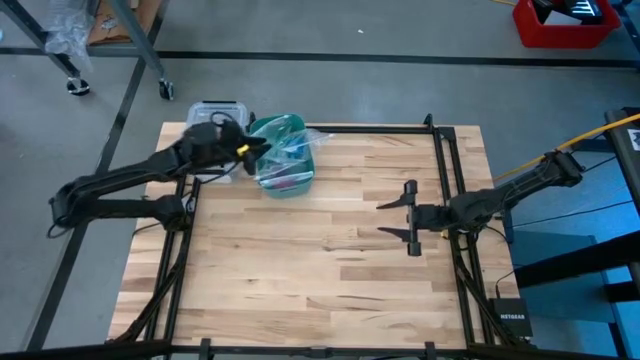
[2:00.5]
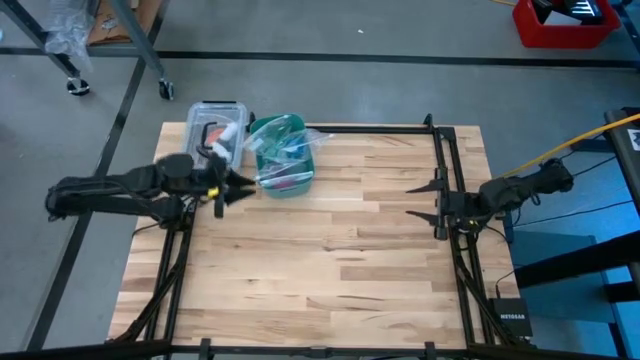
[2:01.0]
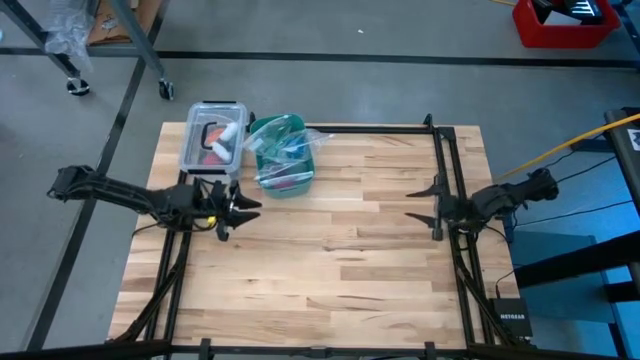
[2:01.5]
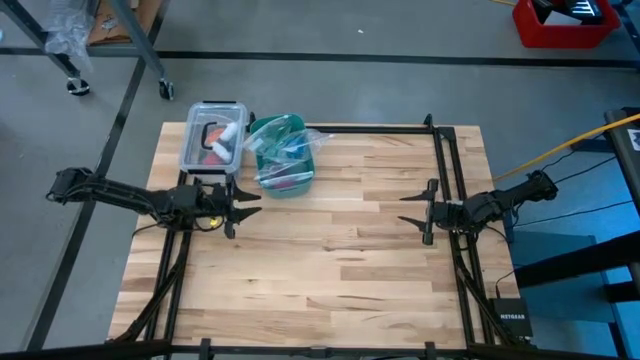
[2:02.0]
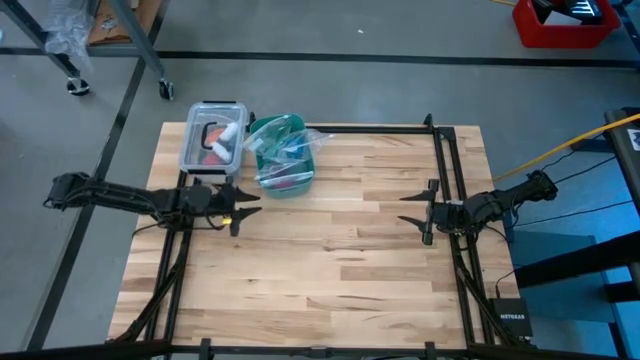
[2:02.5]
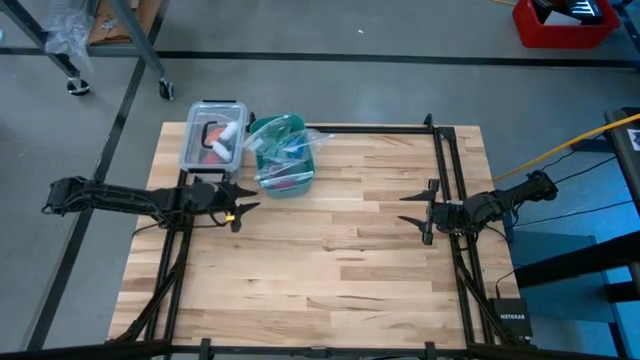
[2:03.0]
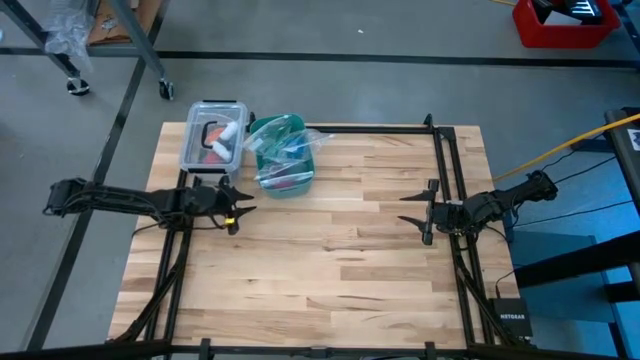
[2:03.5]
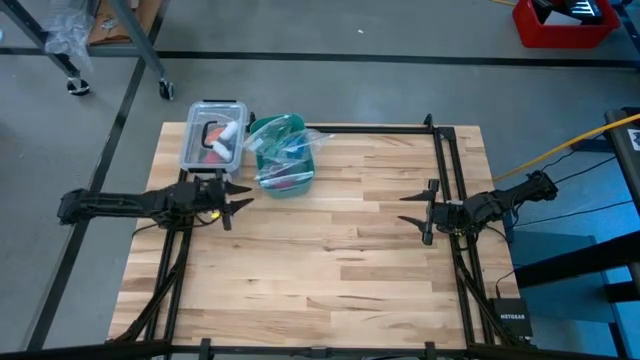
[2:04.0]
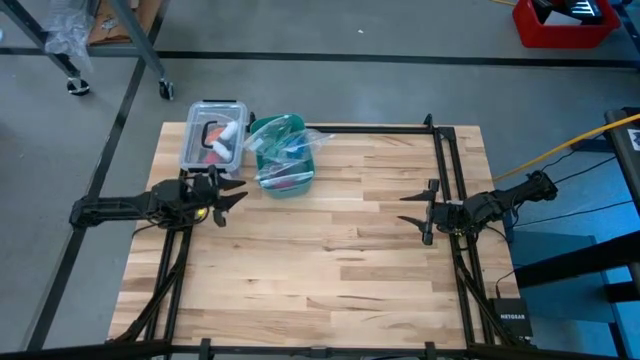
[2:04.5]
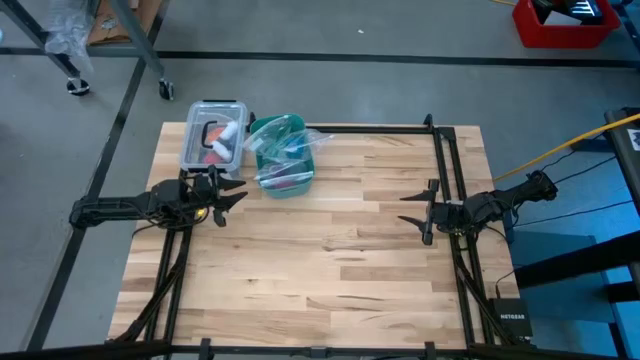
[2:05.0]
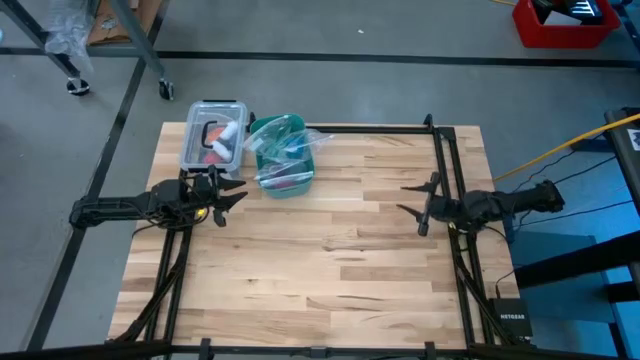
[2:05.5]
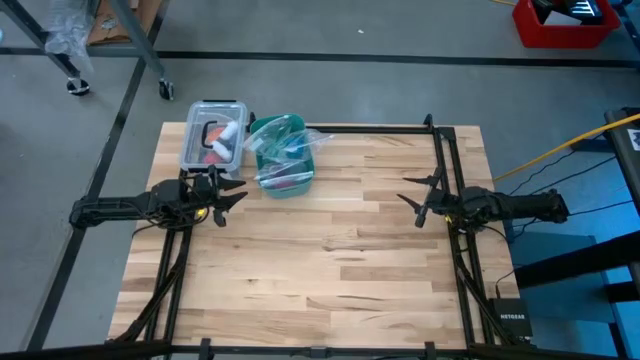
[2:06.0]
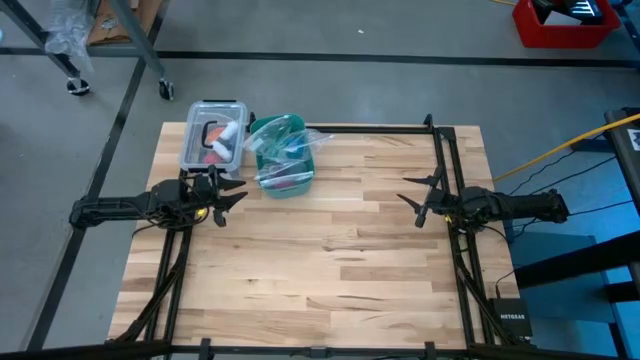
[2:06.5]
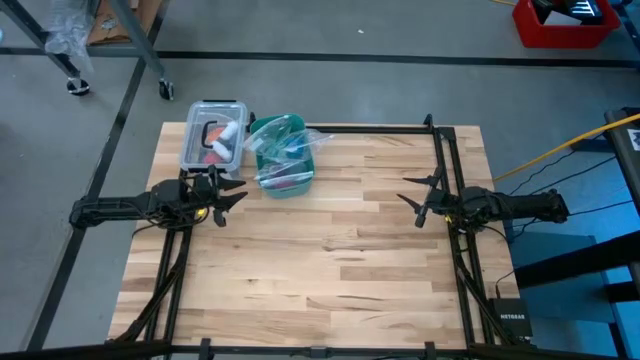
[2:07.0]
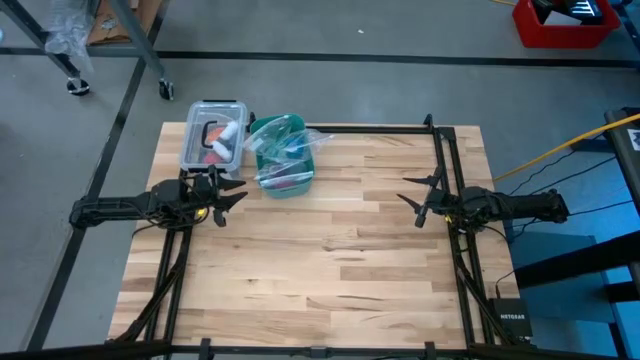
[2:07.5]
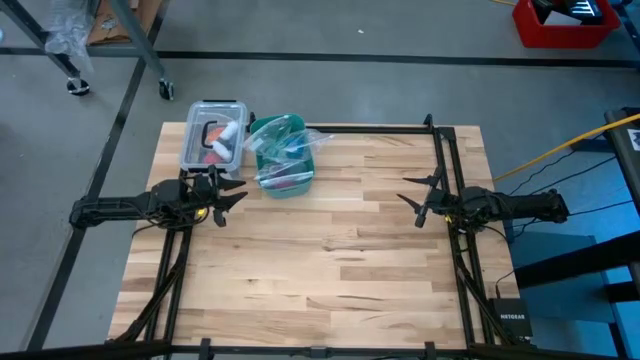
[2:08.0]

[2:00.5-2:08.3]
Task: Roll bandage
Return to Home Position

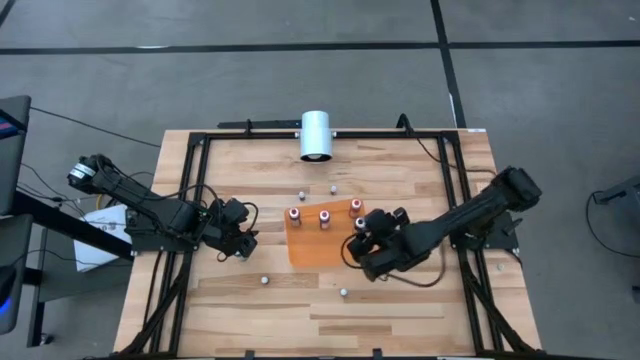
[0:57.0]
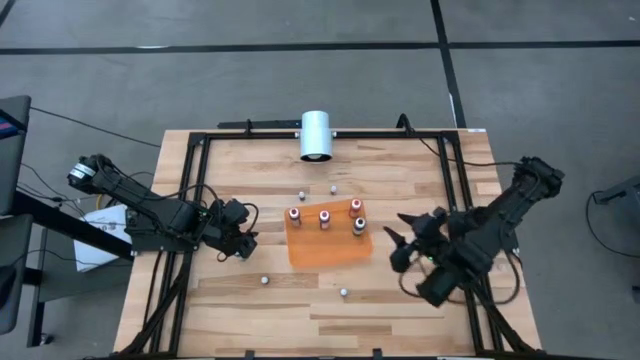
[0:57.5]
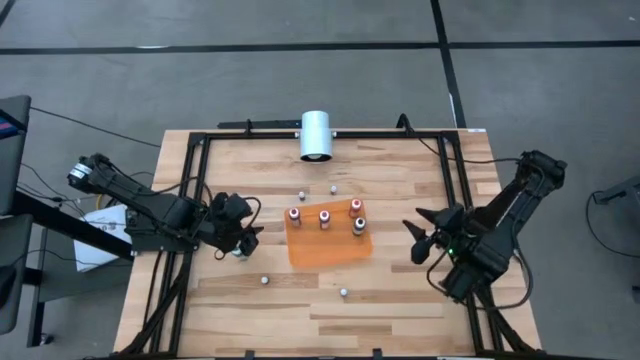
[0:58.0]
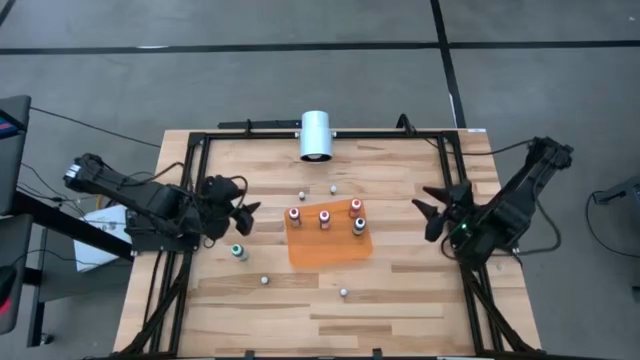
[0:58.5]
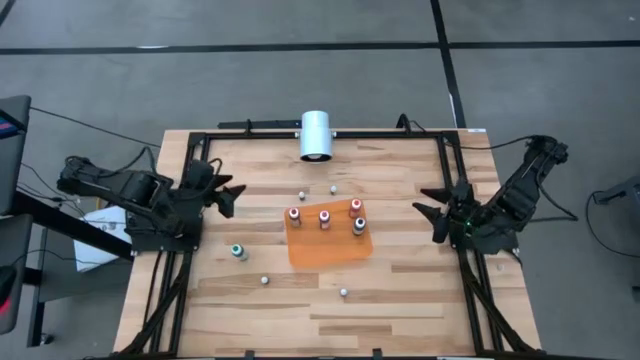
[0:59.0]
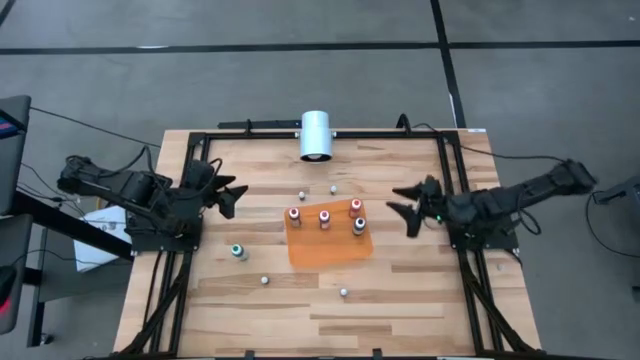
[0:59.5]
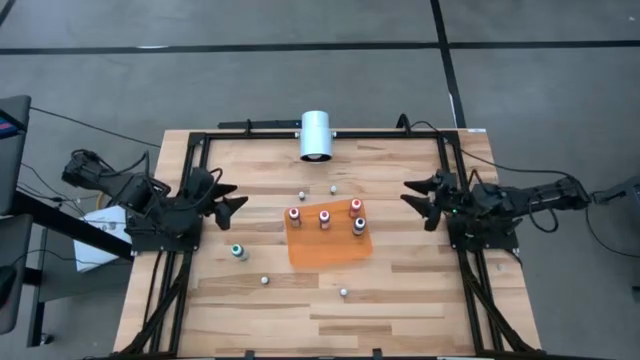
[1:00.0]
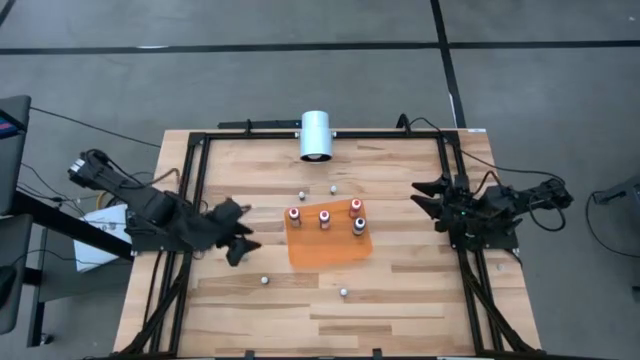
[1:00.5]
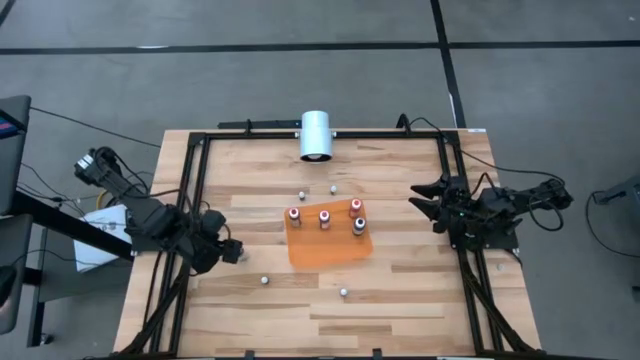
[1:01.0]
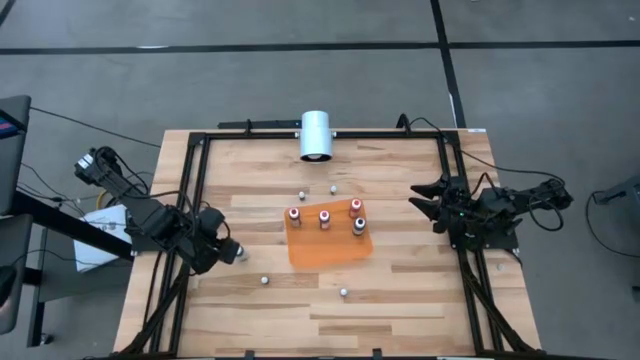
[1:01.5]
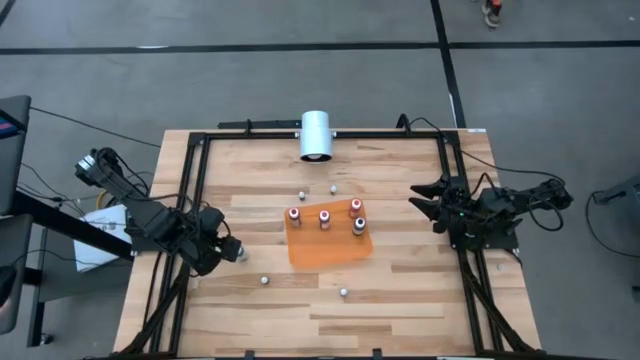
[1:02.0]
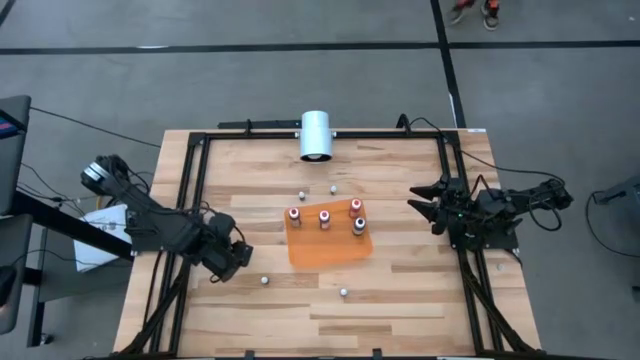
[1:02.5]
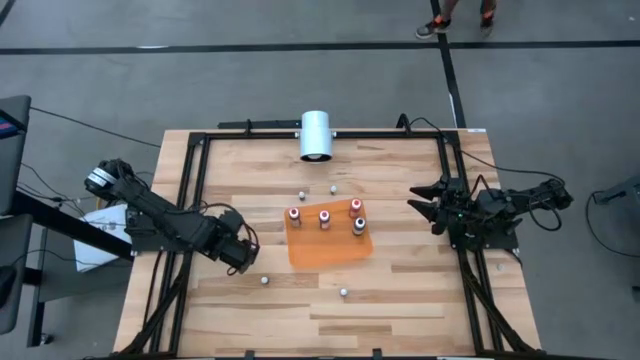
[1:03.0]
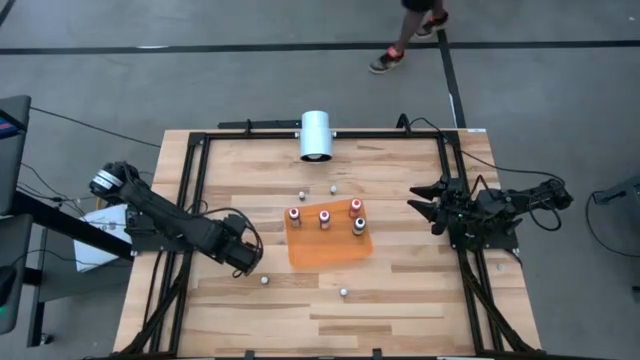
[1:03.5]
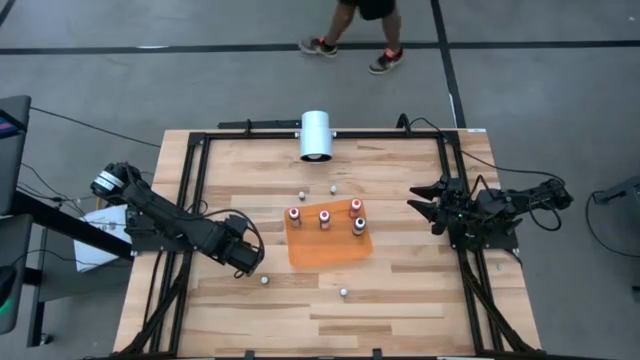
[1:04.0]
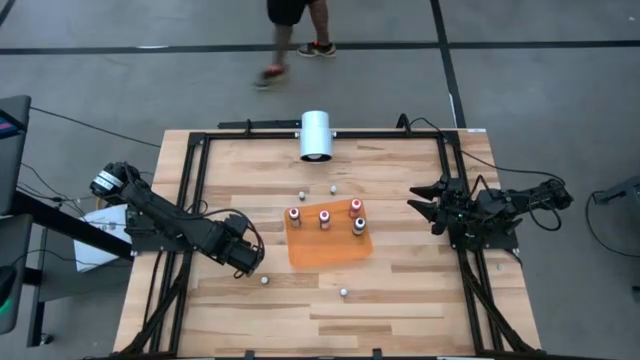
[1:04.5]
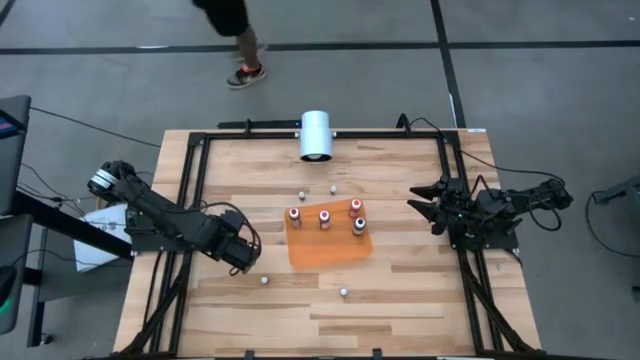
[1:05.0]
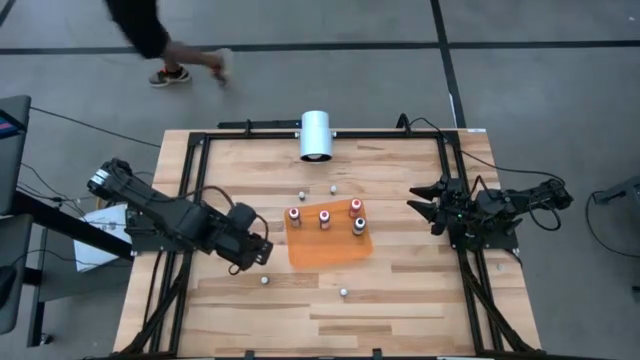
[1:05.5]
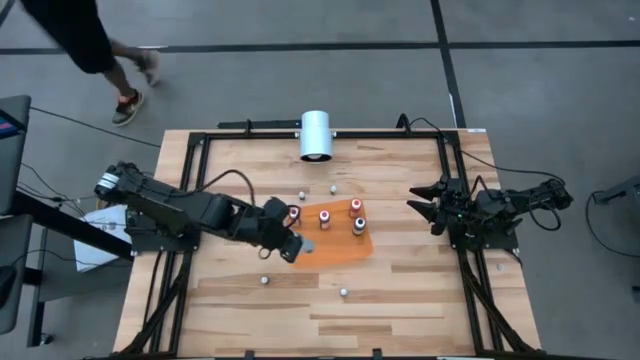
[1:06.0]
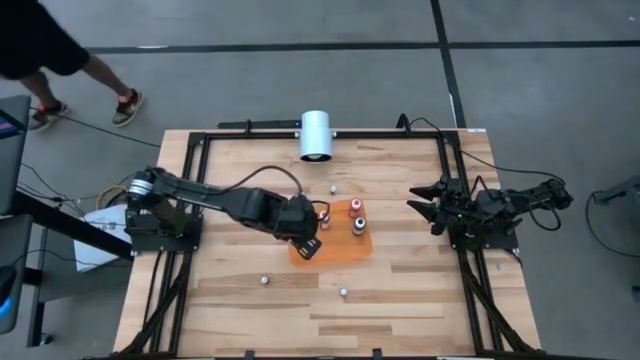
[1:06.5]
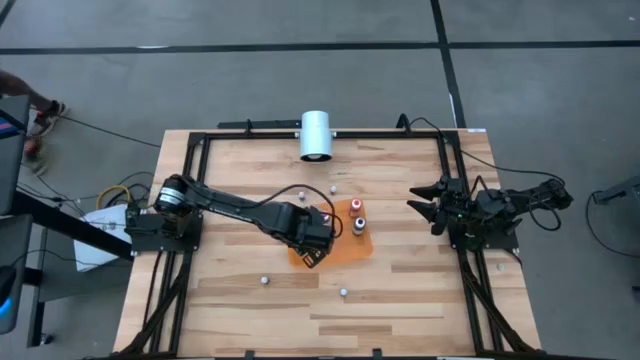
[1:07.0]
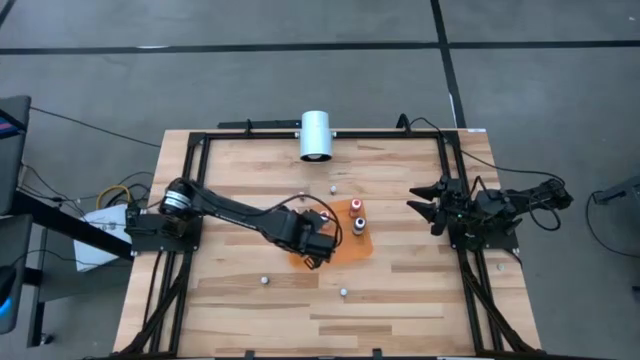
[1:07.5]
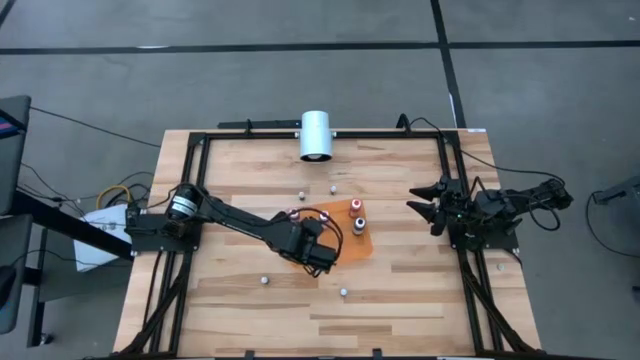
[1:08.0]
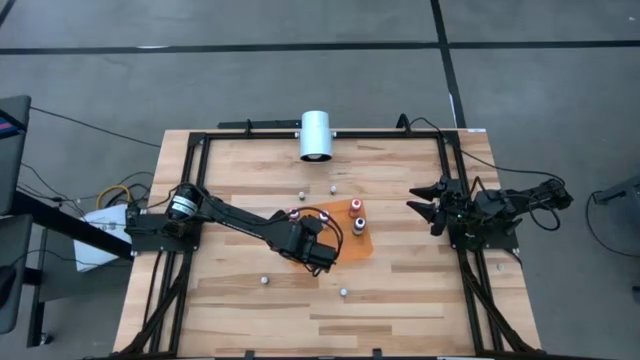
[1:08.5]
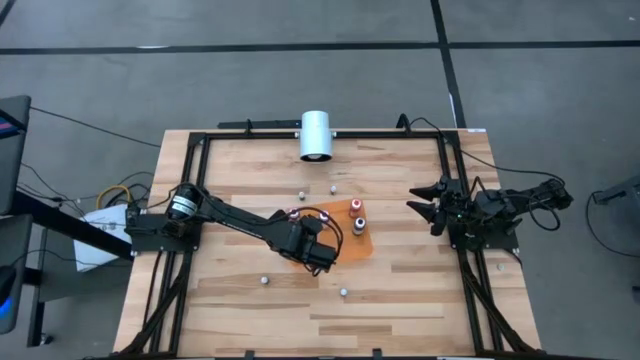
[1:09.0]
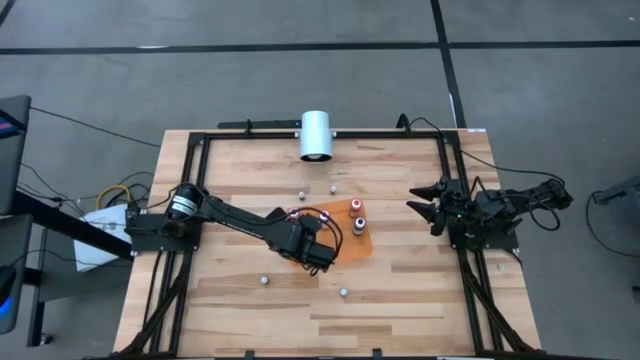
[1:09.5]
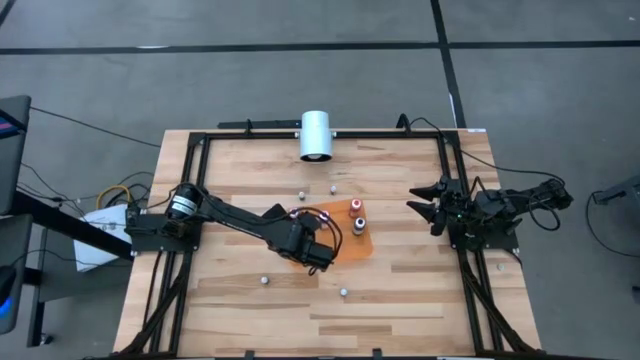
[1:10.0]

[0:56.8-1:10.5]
Task: Pick & Place food coloring
Put the large green food coloring bottle into the orange container

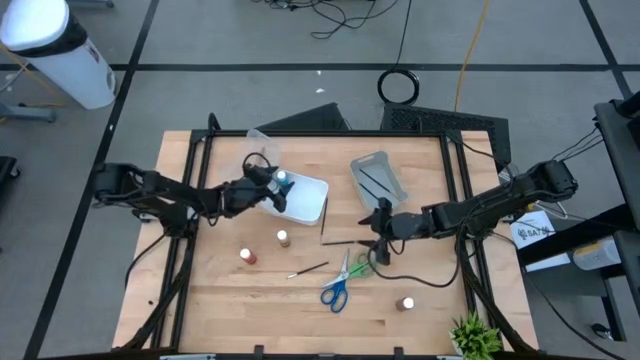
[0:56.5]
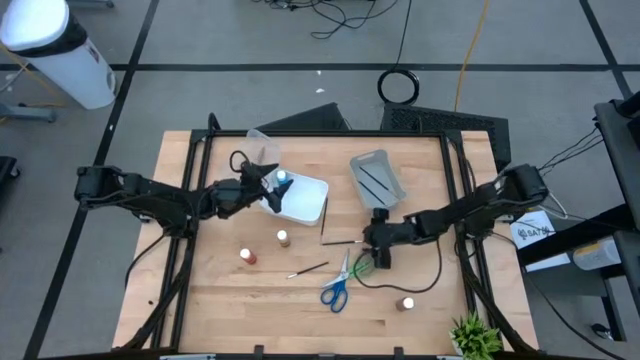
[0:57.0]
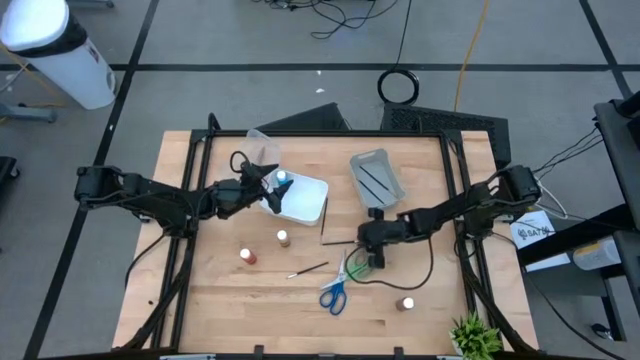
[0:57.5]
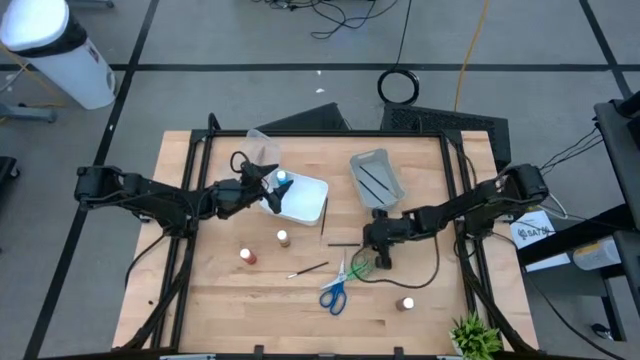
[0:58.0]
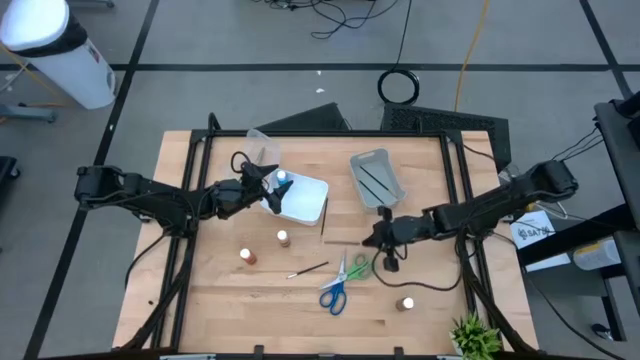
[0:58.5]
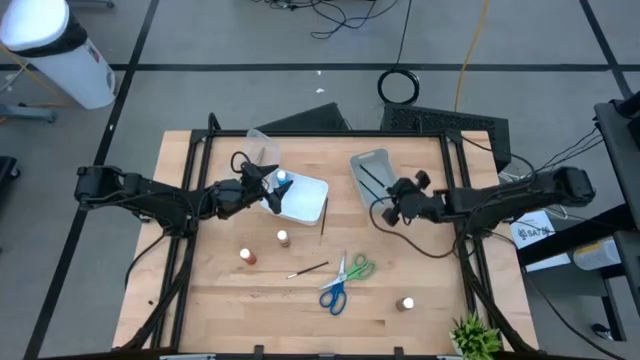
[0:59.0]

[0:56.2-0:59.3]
Task: Pick & Place Paint Supplies
Put the top silver and black paintbrush into the gray bin
